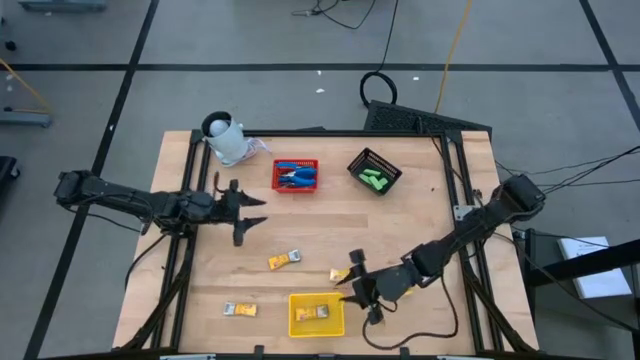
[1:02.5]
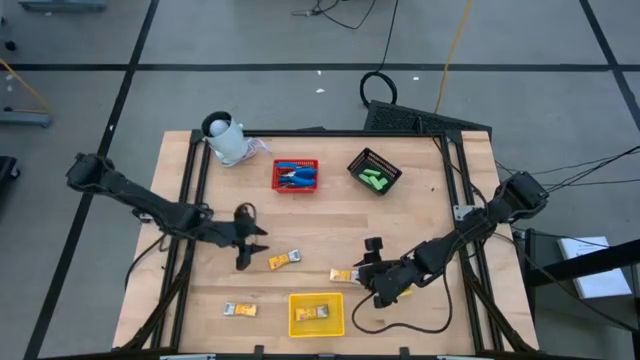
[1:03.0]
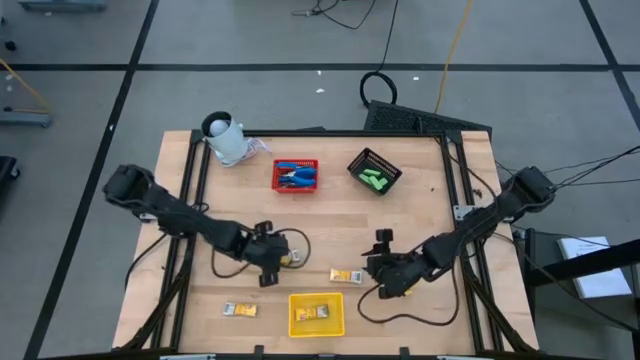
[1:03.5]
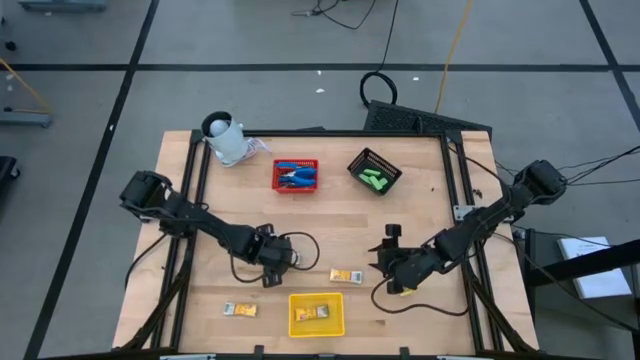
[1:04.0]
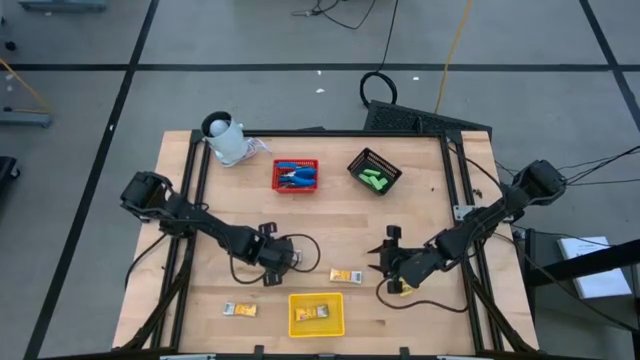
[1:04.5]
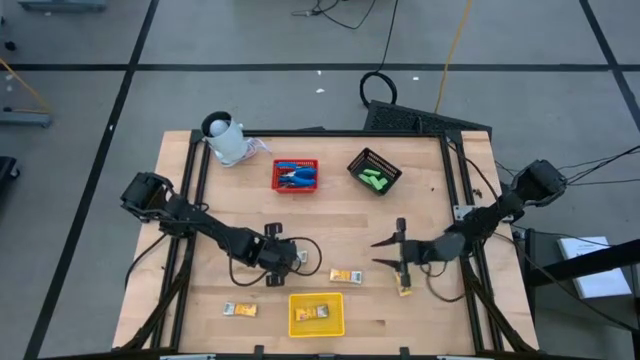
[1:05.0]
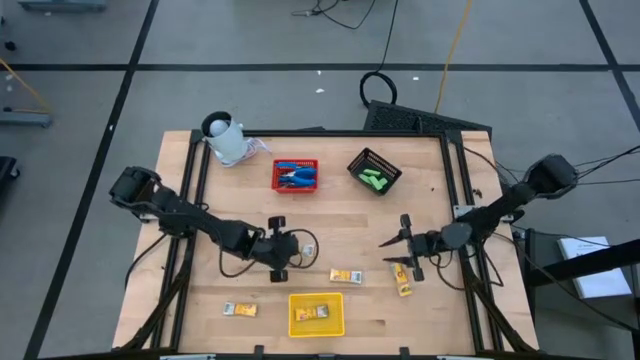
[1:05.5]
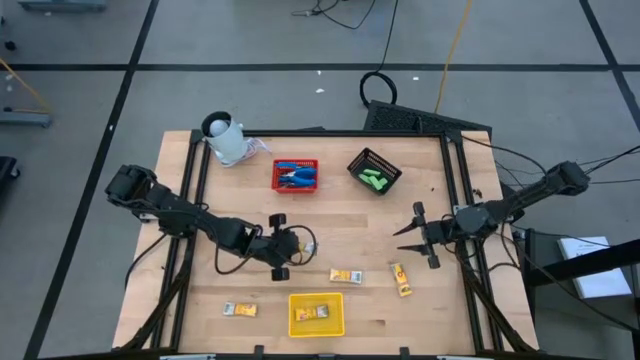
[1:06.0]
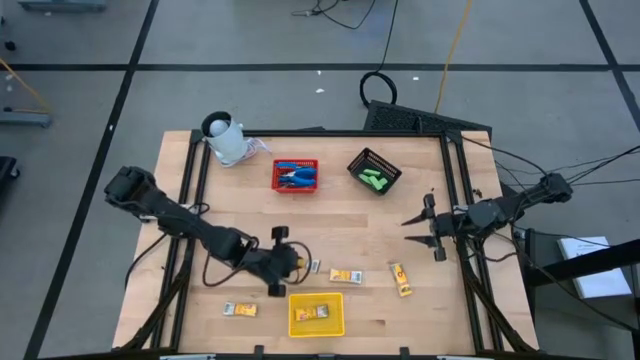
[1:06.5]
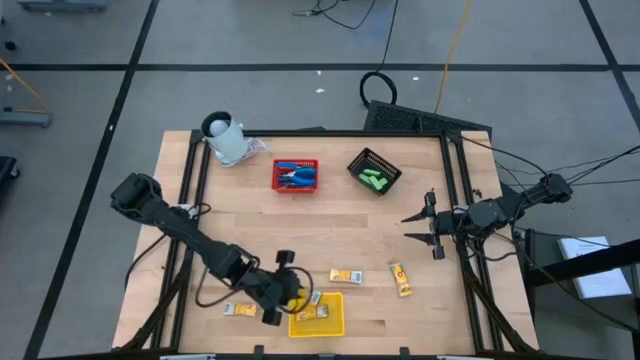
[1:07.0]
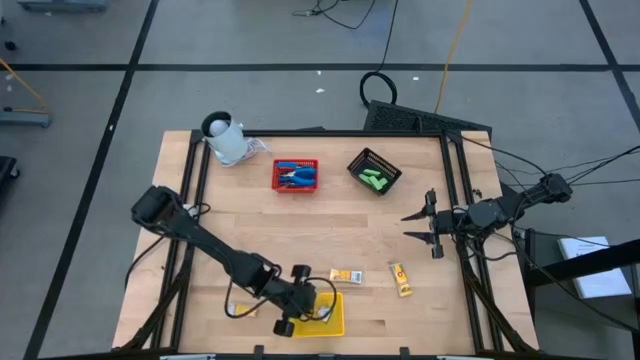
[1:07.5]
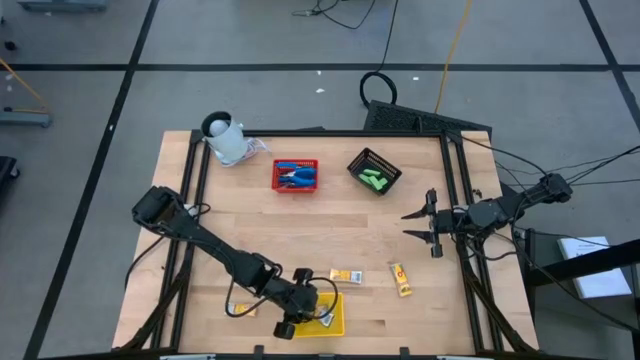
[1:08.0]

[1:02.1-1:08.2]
Task: Pick & Place School Supplies
Put the yellow crayon box into the yellow bin

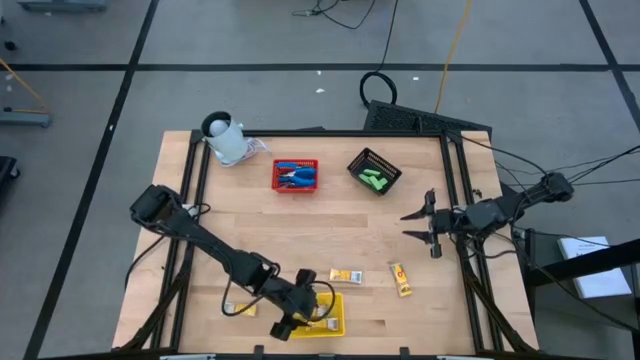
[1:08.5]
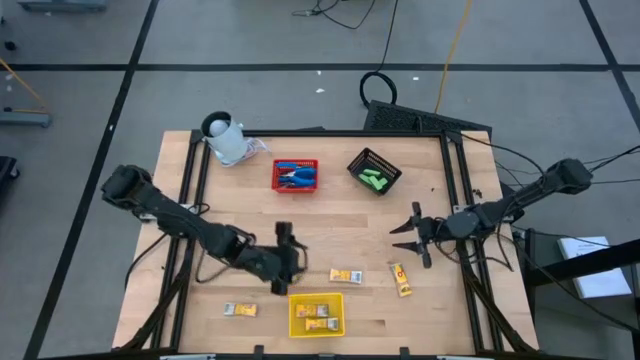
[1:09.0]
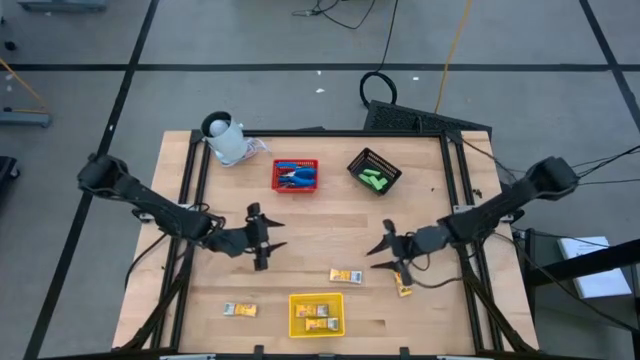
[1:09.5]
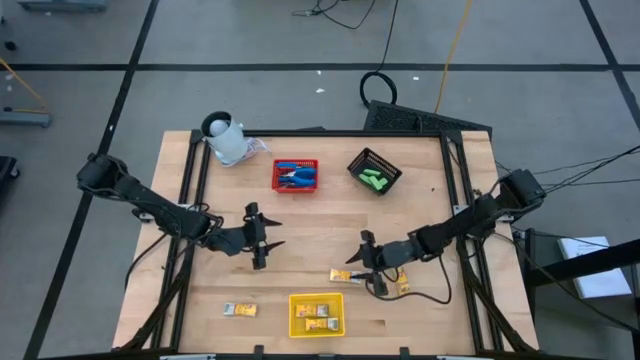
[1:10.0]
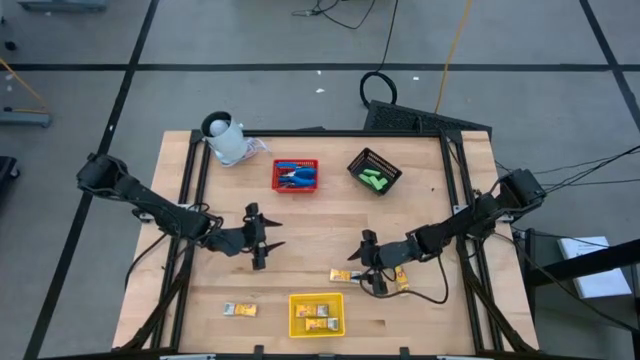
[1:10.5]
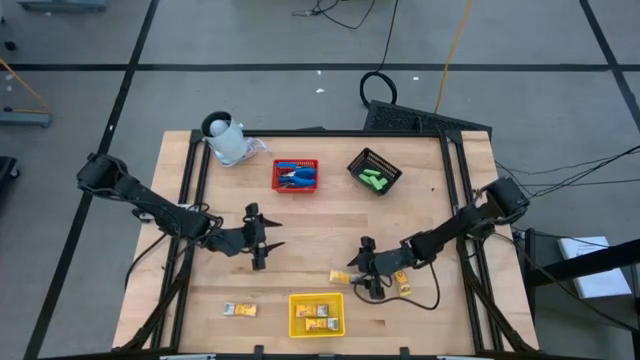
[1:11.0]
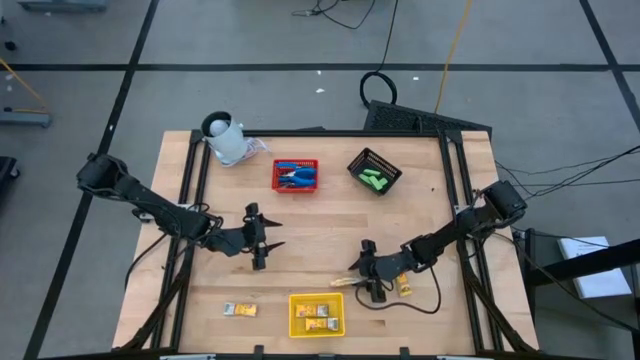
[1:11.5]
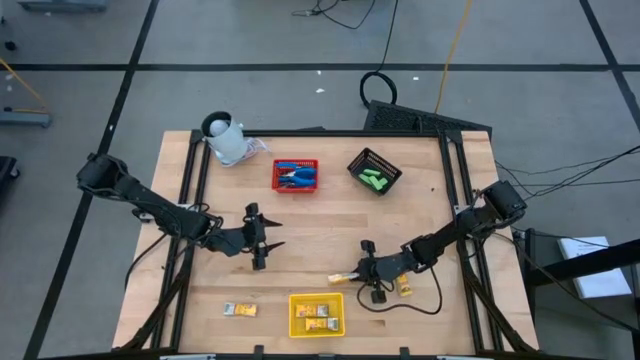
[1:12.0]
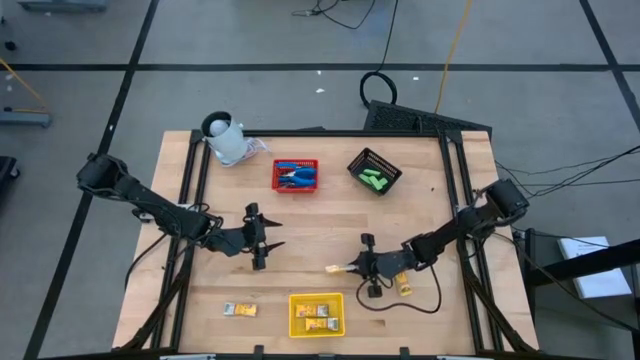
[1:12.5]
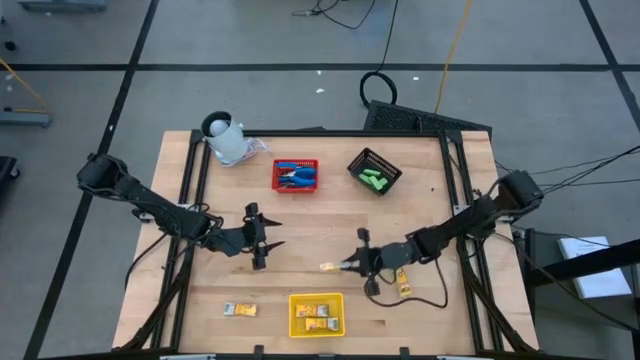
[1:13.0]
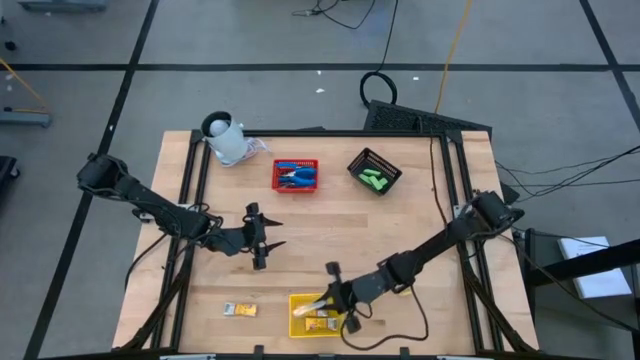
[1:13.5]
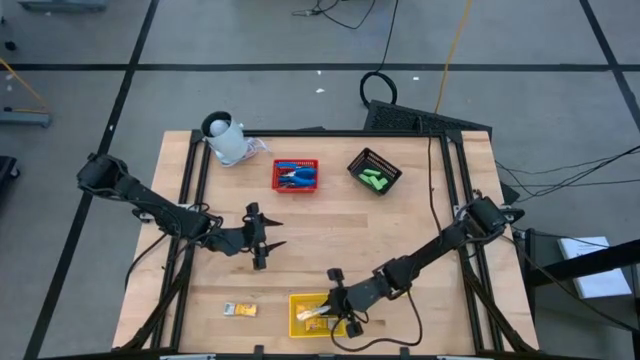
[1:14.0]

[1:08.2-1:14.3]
Put the yellow crayon box into the yellow bin

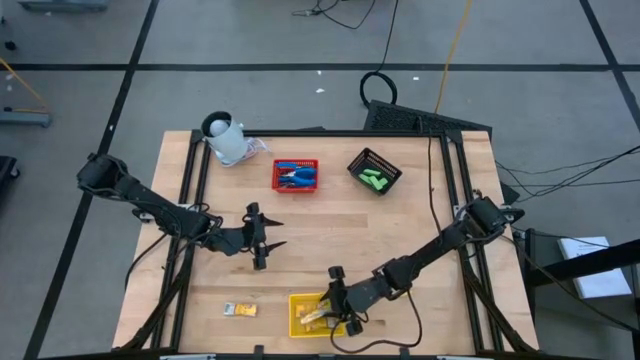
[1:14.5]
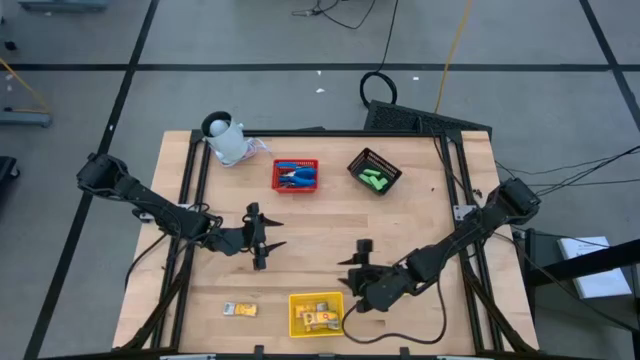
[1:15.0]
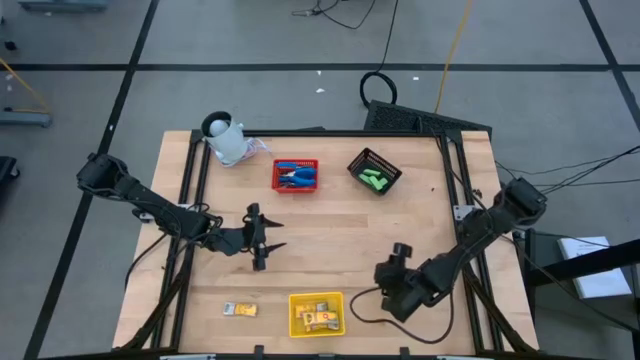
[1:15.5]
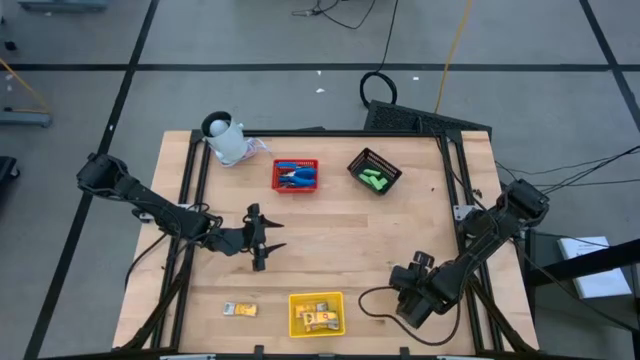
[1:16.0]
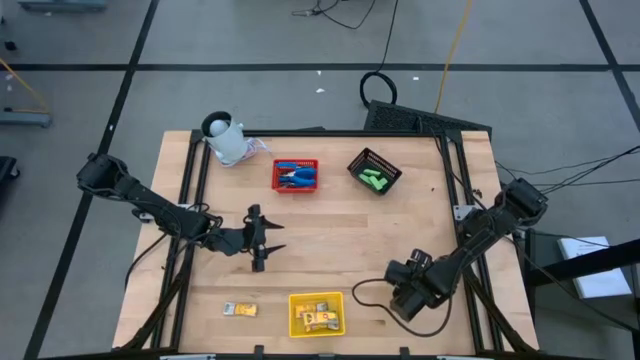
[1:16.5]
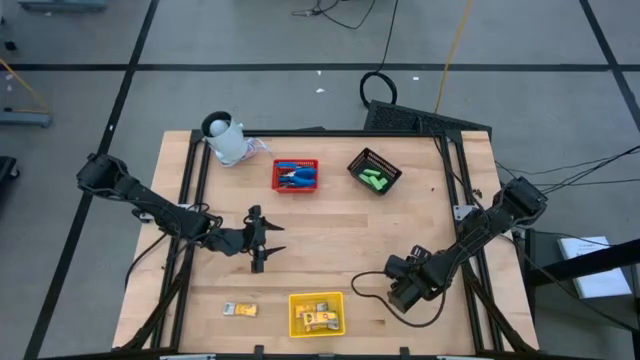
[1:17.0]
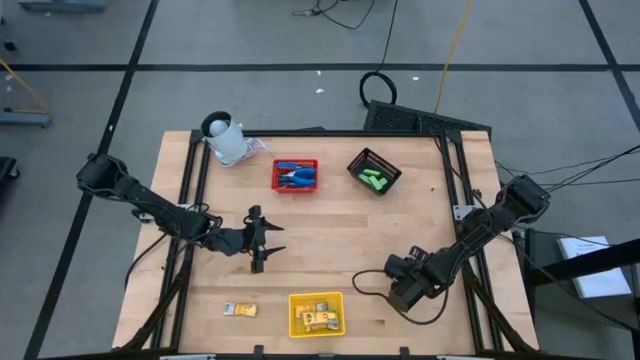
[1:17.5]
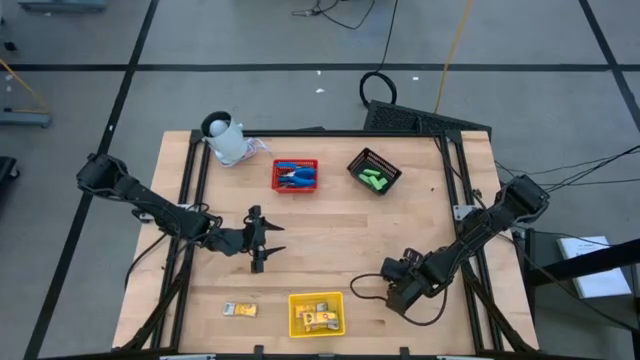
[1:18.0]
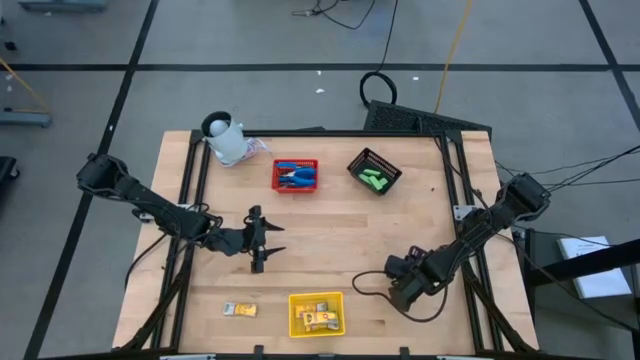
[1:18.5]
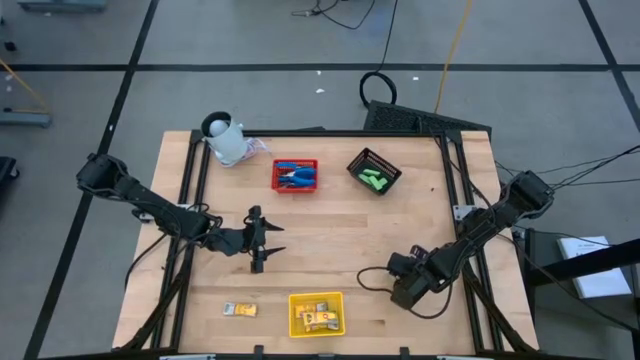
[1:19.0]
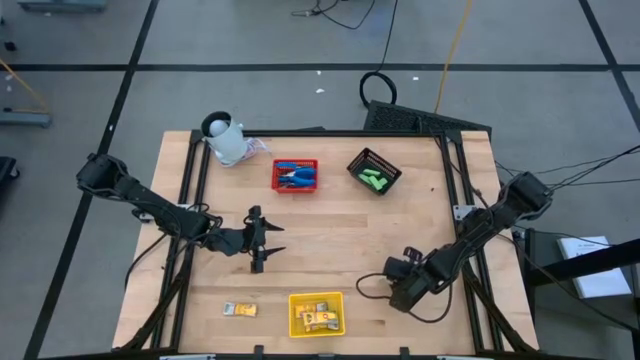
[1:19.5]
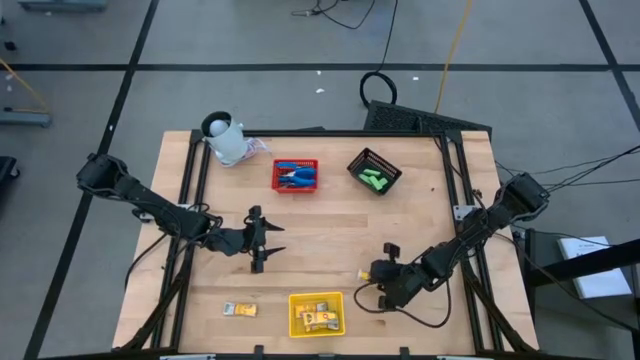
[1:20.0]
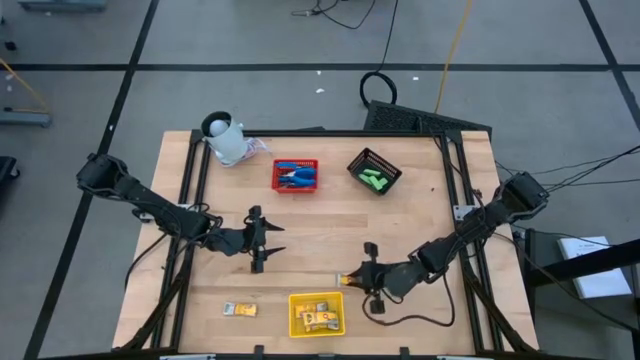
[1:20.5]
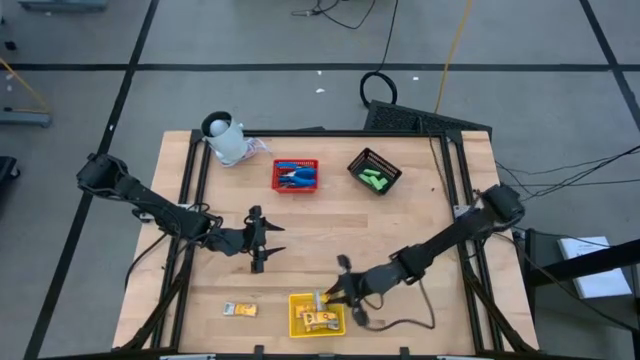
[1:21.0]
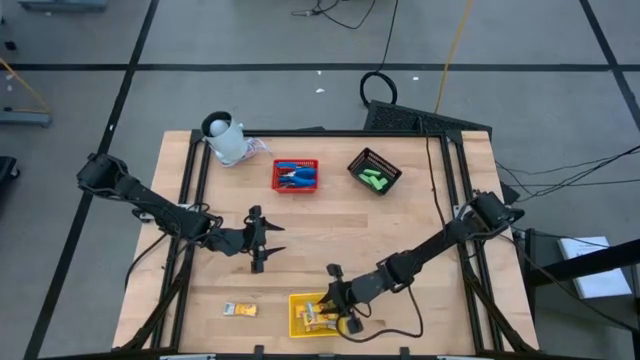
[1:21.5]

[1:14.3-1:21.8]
Put the yellow crayon box into the yellow bin
